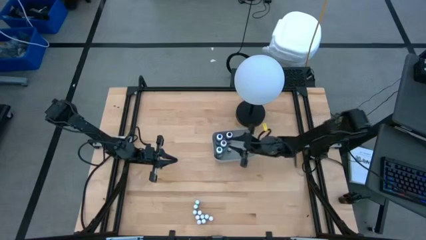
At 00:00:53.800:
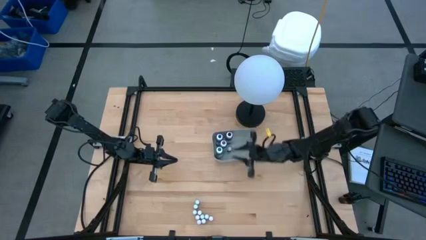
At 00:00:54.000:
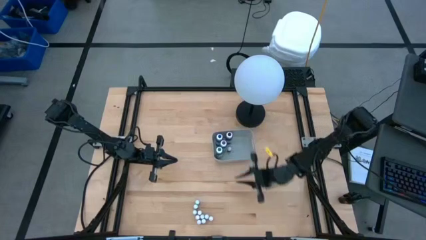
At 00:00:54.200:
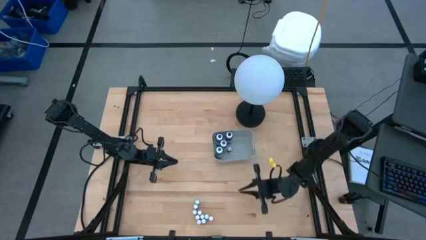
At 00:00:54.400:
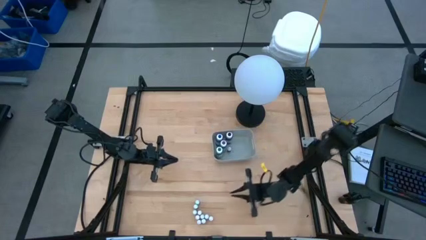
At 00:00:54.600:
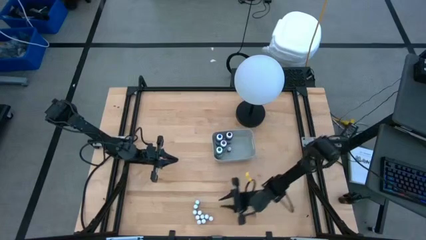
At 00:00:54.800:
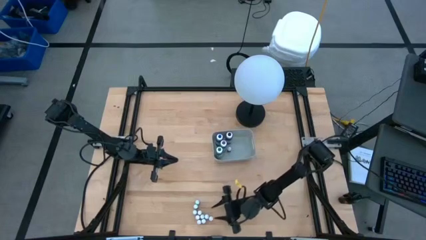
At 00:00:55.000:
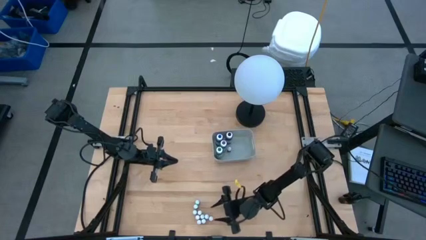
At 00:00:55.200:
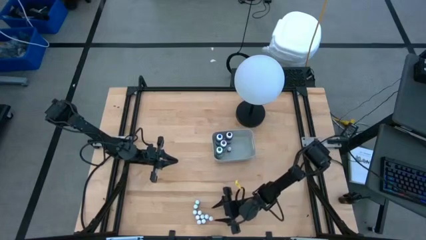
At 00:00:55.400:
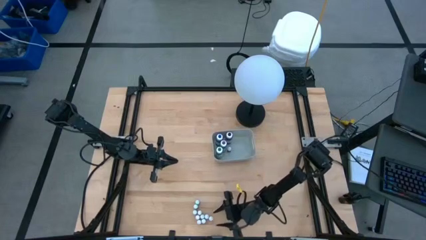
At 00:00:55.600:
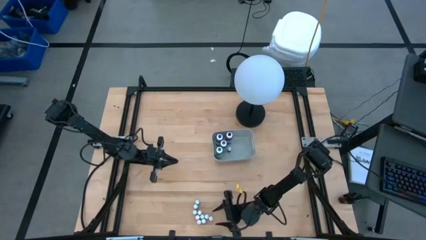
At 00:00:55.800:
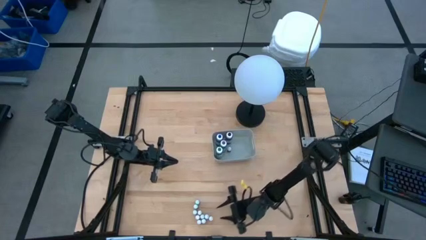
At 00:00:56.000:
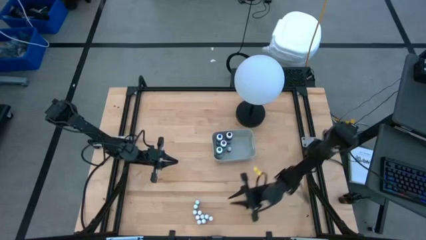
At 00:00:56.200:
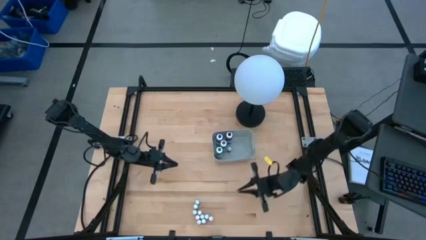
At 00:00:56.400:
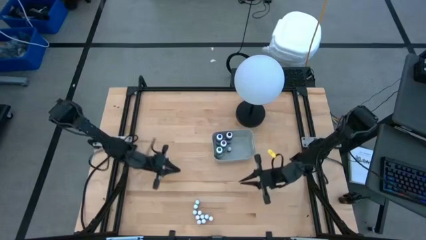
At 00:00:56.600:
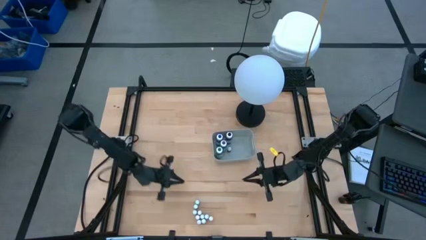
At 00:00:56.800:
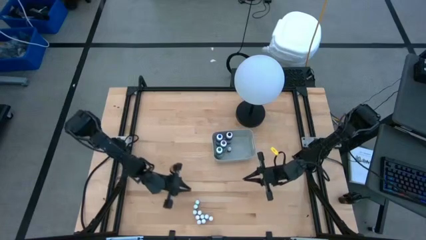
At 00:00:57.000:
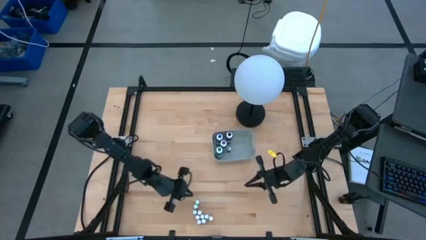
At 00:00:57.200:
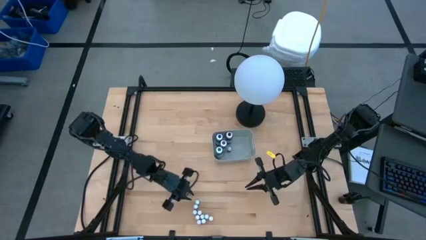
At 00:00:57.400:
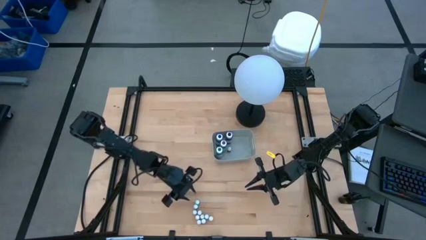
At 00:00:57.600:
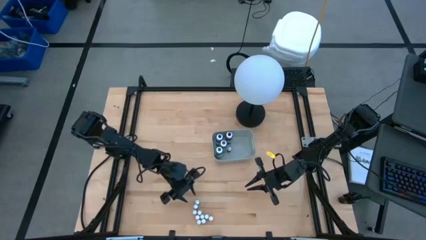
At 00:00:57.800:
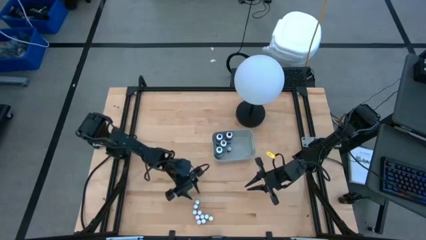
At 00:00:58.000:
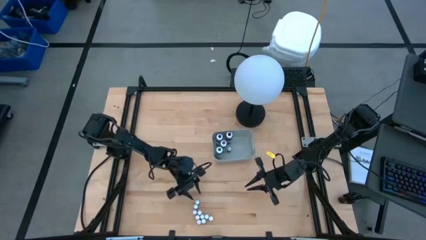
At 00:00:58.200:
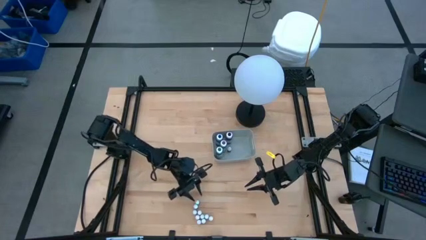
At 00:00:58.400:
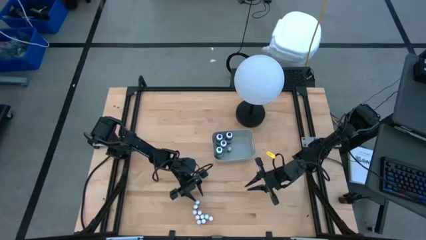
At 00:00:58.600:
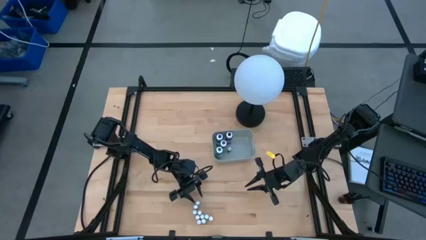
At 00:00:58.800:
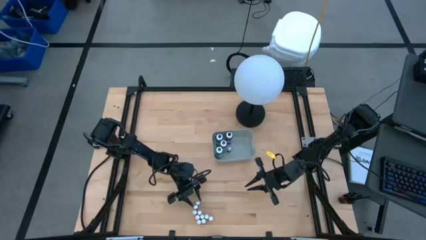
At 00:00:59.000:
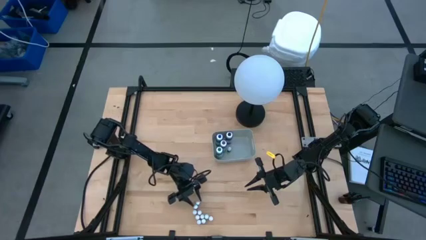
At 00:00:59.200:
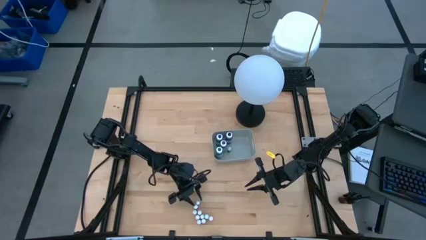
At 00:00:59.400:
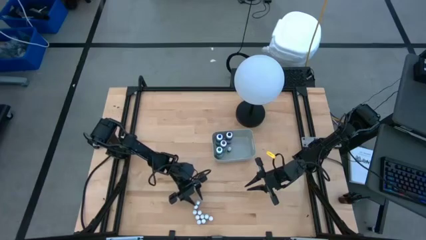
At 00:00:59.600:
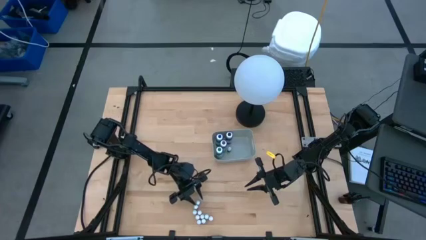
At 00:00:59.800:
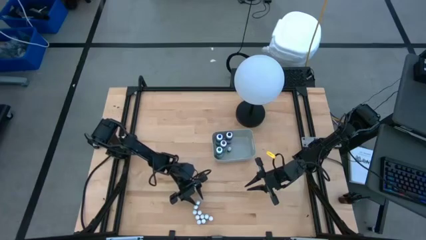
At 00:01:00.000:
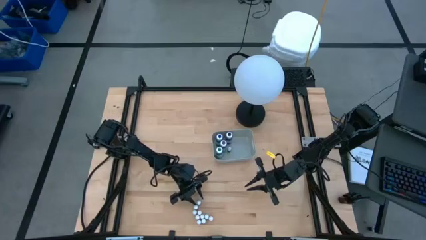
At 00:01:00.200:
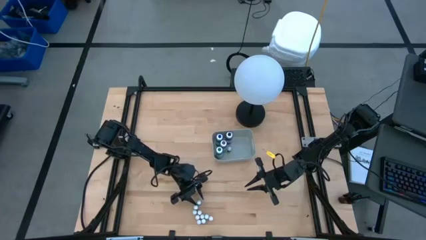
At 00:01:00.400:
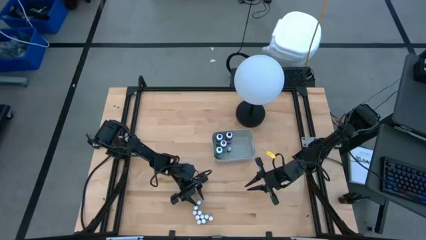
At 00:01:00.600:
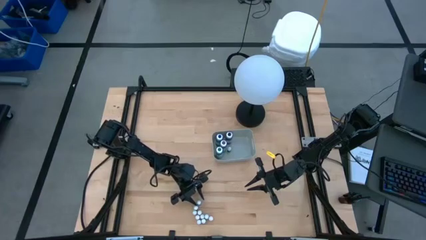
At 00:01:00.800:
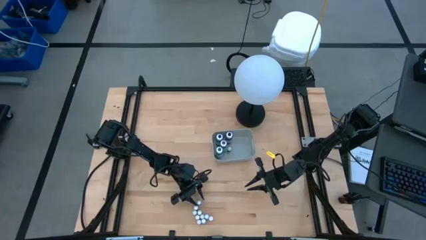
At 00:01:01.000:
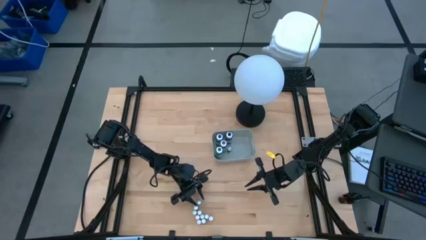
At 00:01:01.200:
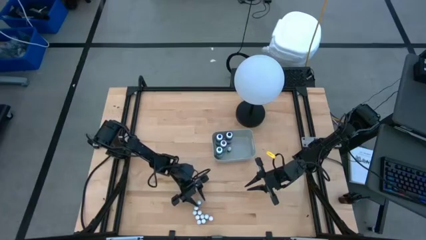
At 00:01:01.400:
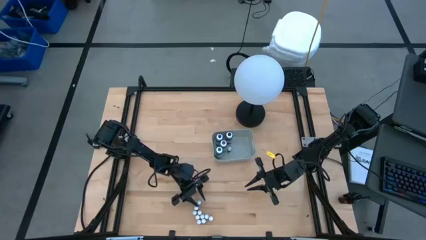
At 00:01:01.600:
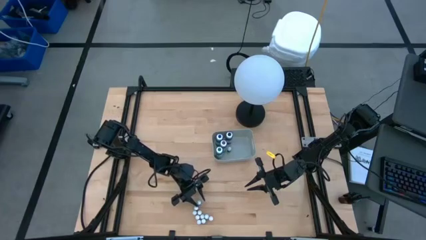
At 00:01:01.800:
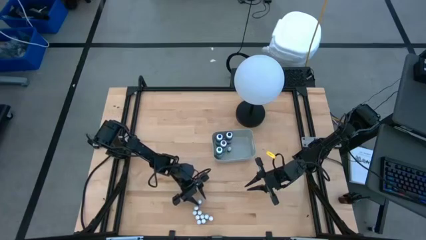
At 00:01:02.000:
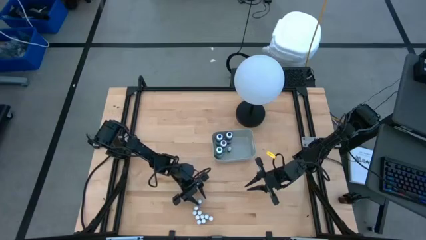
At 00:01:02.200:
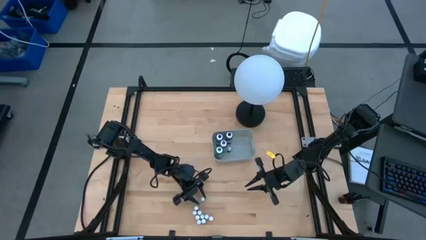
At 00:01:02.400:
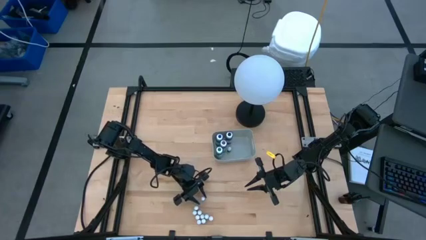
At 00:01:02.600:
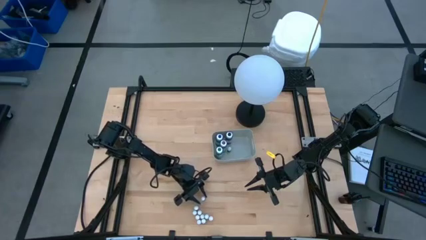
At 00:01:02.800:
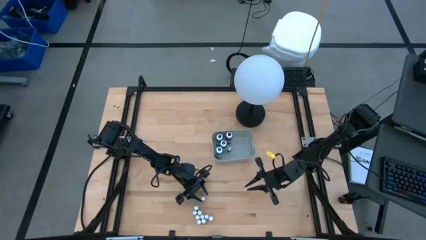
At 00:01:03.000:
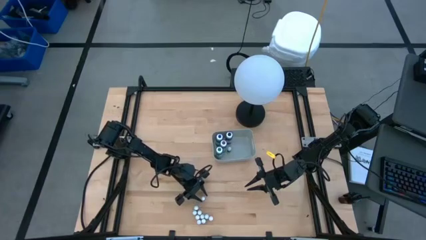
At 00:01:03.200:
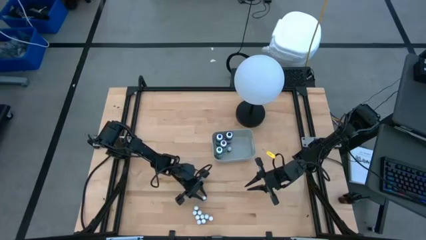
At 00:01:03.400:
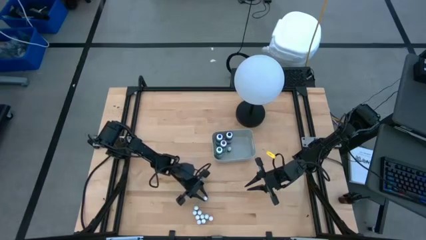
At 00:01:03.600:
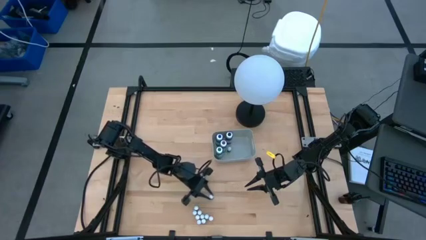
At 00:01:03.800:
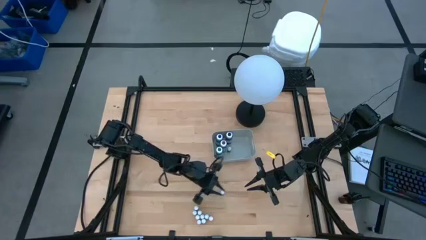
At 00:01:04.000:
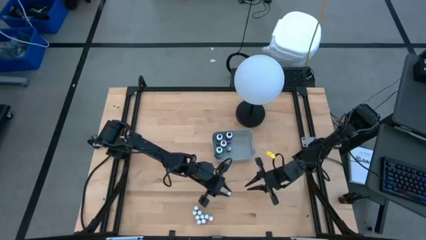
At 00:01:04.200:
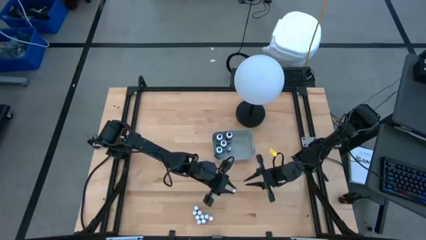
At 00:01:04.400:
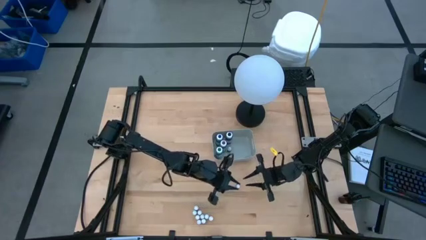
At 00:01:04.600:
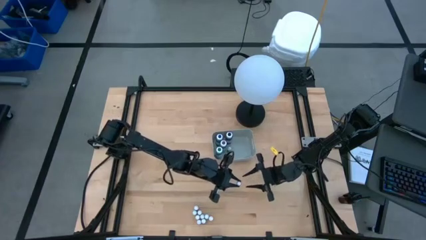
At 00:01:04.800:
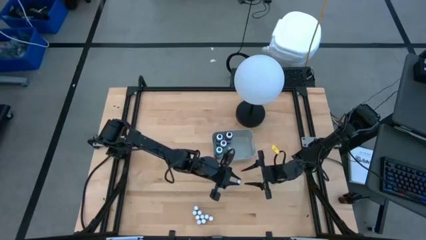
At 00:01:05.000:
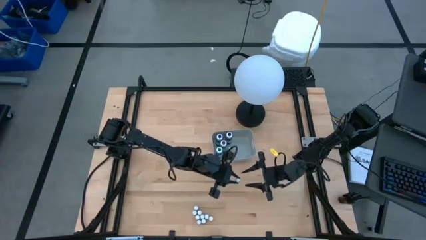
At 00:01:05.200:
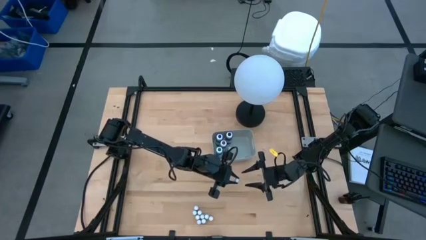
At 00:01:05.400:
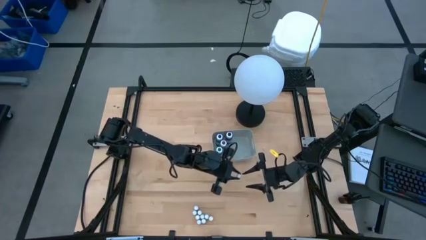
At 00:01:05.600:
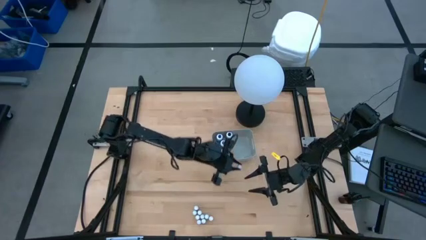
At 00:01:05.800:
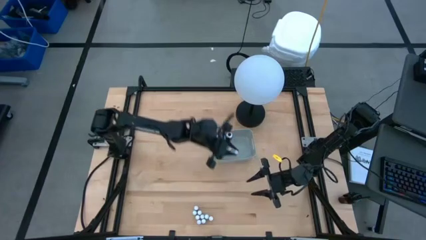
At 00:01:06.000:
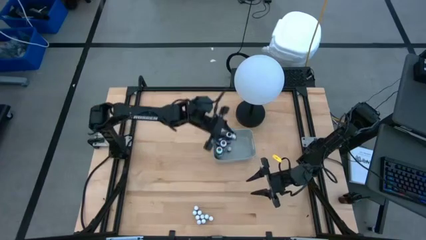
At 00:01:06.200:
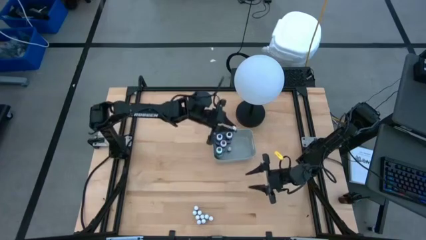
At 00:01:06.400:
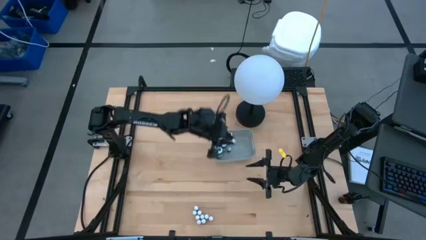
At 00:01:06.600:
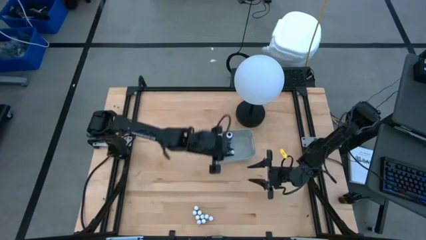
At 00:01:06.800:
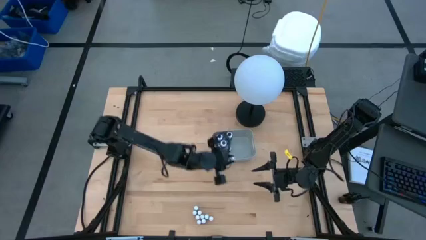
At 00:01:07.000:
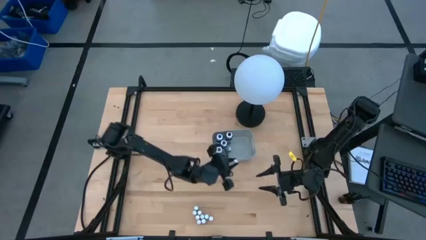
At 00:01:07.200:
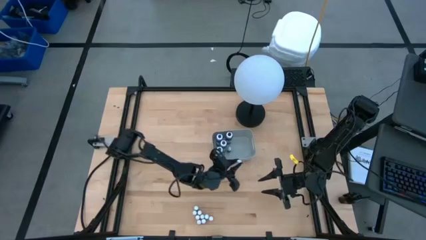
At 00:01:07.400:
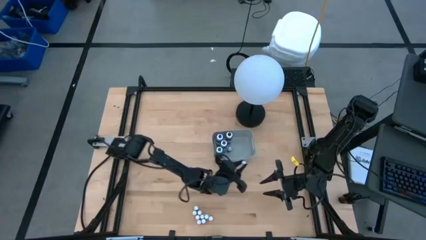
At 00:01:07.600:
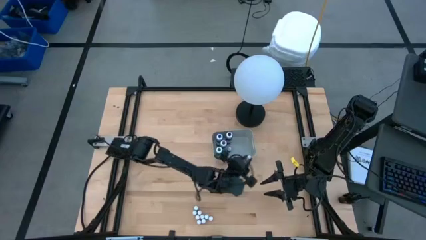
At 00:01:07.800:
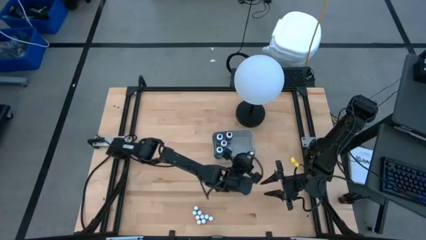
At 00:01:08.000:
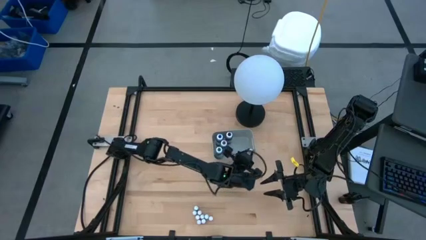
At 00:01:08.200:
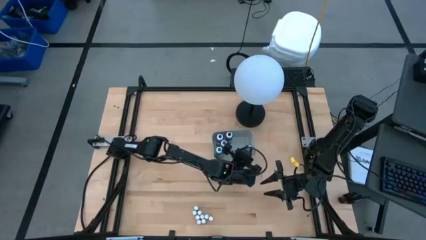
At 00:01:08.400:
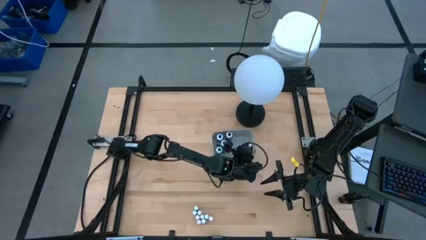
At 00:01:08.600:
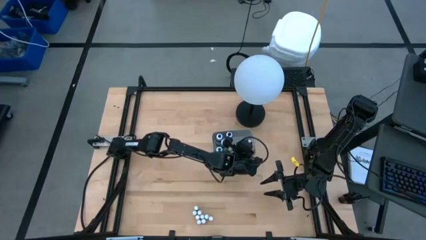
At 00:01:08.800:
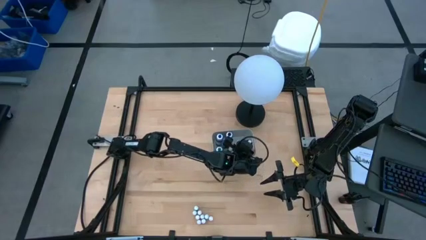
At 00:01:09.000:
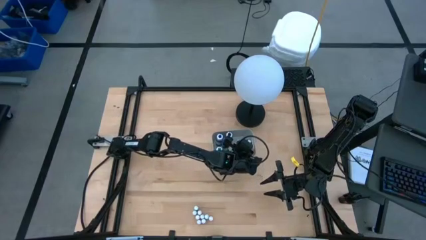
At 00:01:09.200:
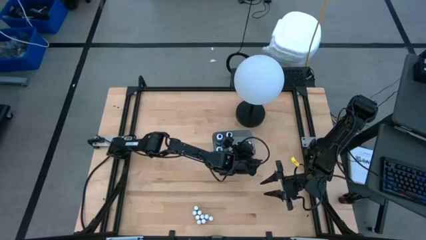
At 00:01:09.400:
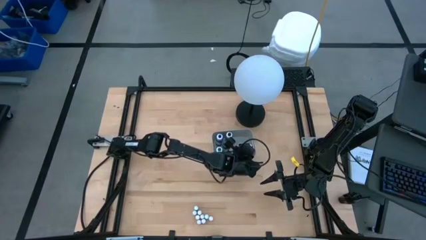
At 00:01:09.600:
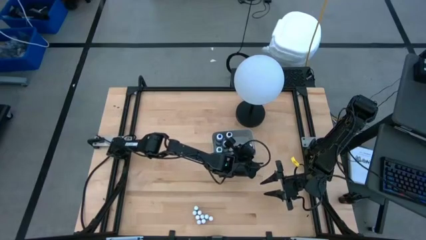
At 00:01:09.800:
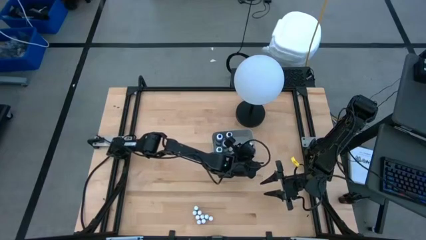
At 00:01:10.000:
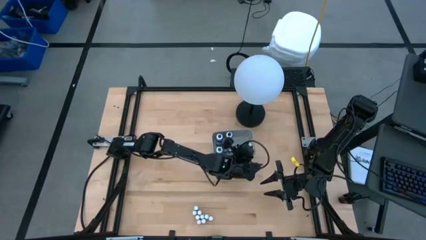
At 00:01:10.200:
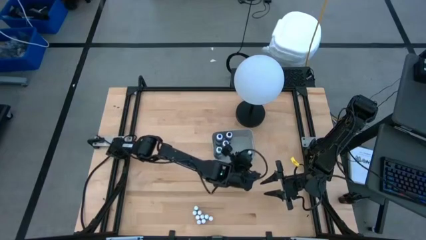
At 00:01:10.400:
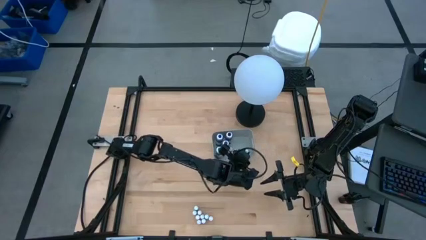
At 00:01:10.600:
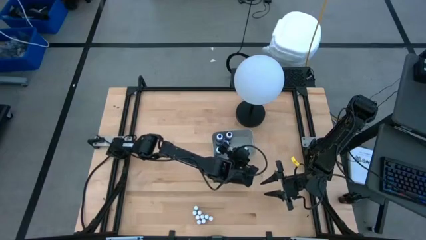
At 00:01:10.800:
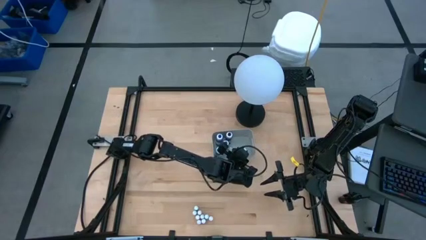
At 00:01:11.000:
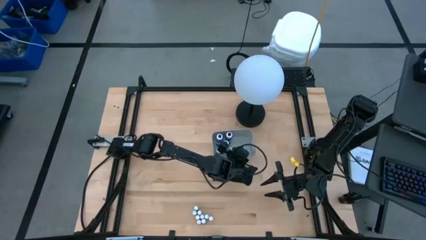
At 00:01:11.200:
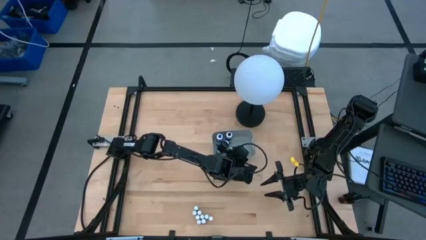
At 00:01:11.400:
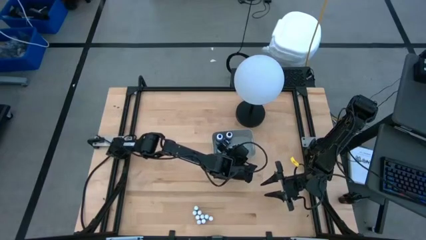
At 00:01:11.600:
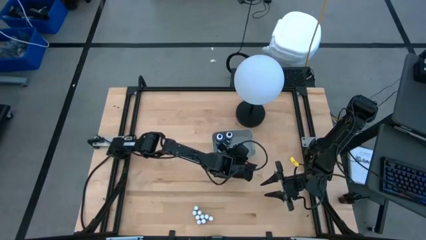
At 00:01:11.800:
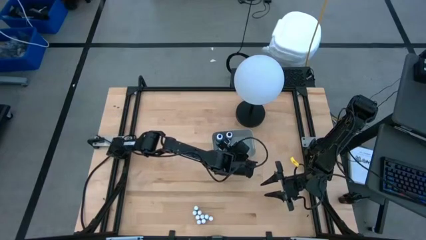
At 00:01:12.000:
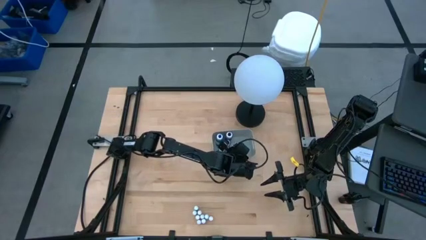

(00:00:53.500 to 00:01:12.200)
Task: Pick & Place food coloring
Put the blue food coloring bottle into the gray bin
